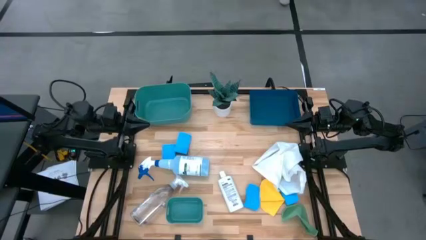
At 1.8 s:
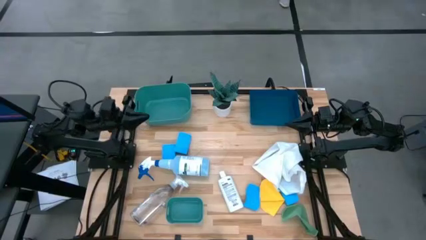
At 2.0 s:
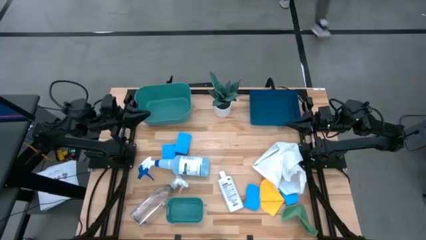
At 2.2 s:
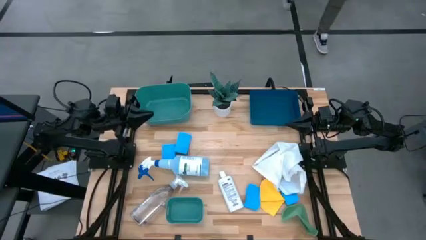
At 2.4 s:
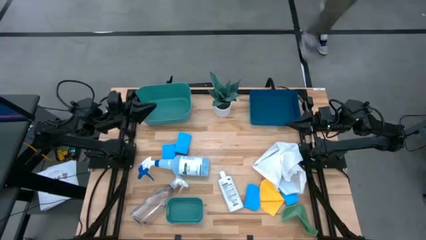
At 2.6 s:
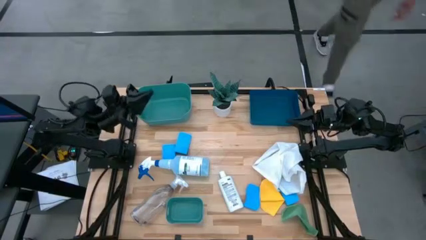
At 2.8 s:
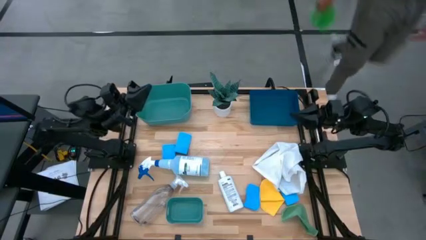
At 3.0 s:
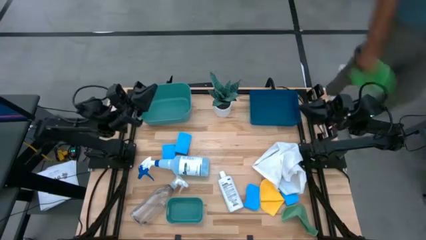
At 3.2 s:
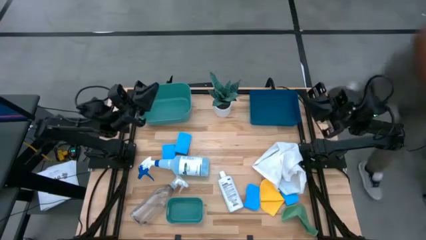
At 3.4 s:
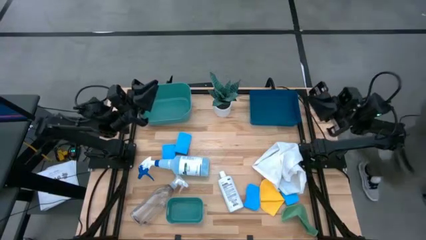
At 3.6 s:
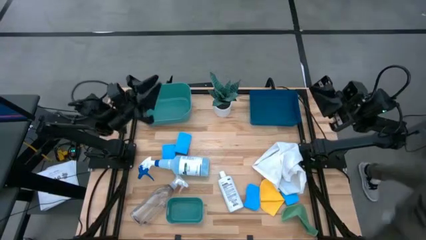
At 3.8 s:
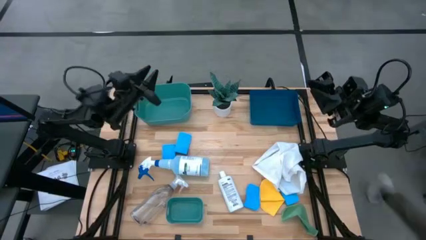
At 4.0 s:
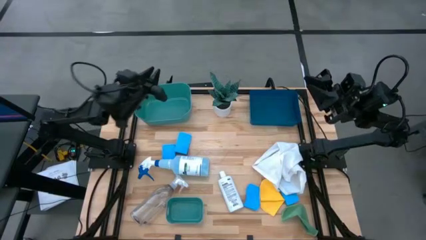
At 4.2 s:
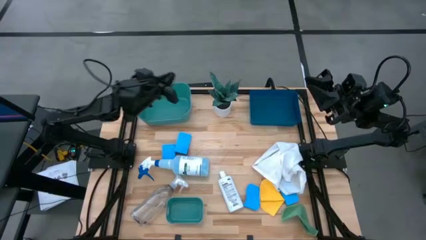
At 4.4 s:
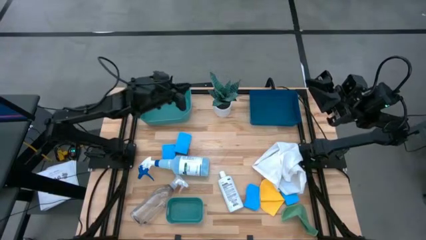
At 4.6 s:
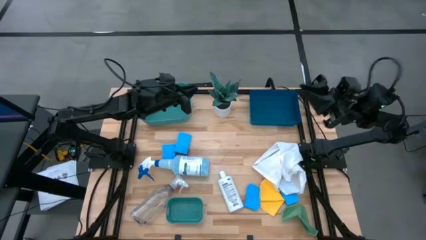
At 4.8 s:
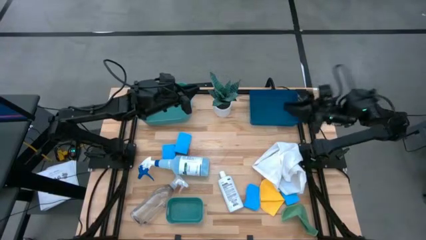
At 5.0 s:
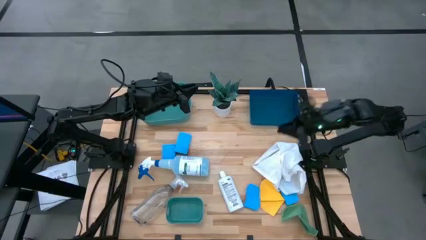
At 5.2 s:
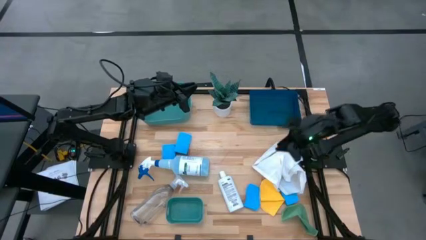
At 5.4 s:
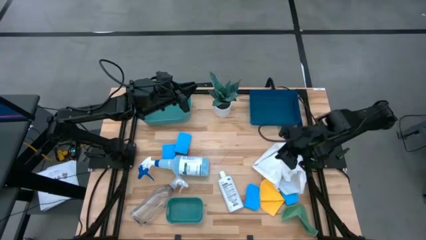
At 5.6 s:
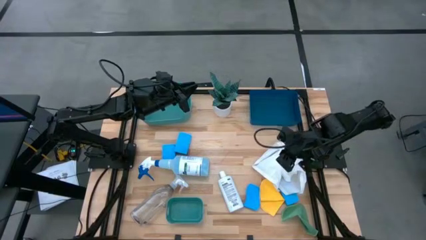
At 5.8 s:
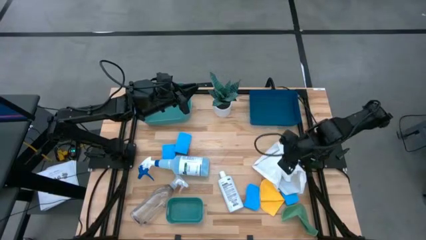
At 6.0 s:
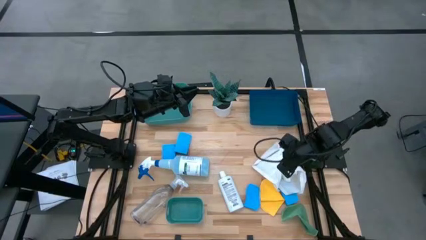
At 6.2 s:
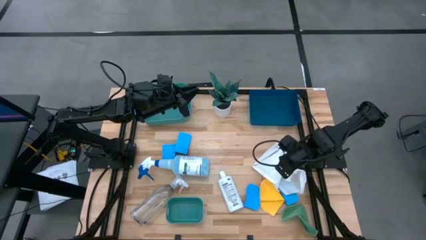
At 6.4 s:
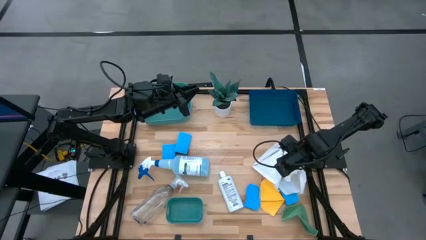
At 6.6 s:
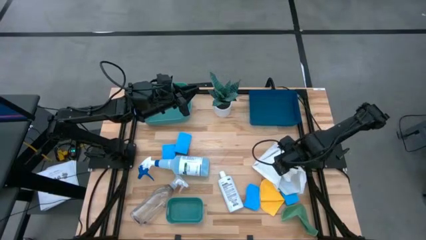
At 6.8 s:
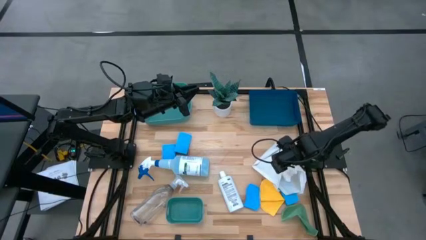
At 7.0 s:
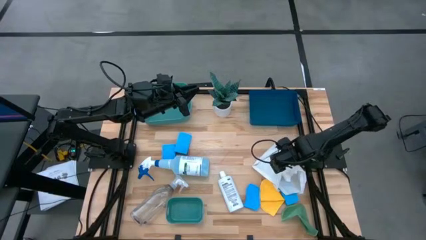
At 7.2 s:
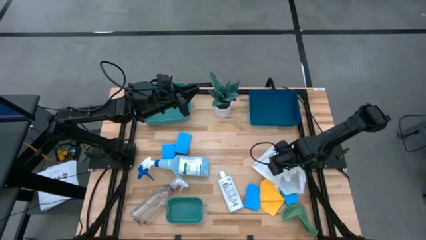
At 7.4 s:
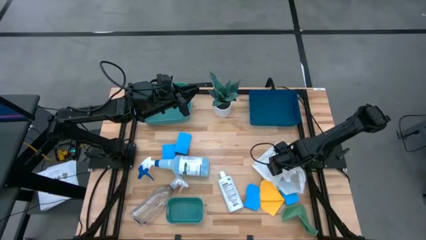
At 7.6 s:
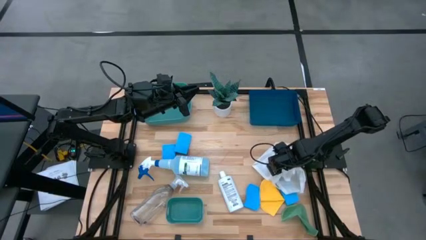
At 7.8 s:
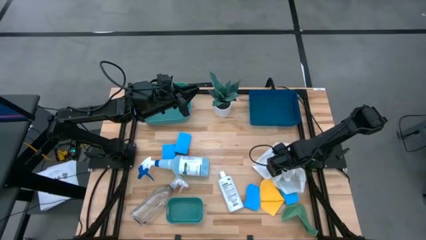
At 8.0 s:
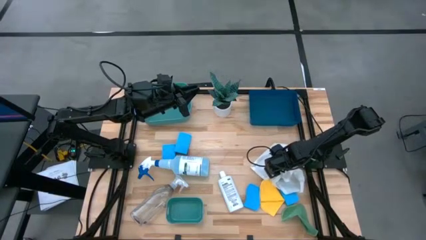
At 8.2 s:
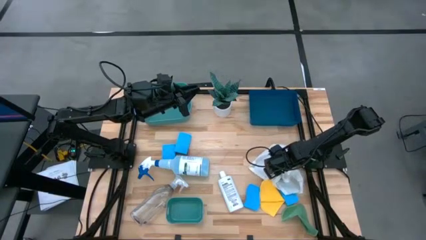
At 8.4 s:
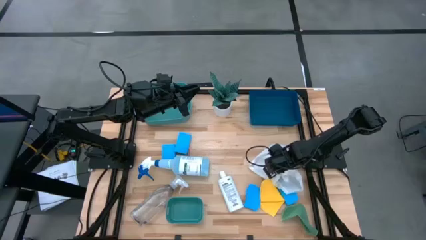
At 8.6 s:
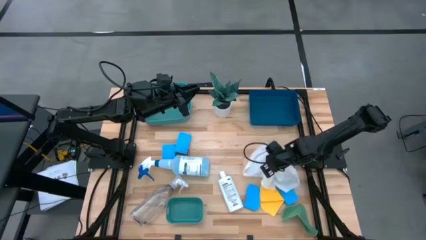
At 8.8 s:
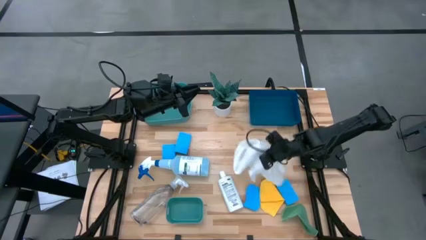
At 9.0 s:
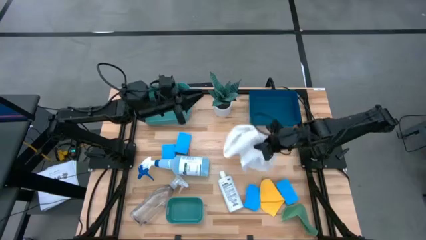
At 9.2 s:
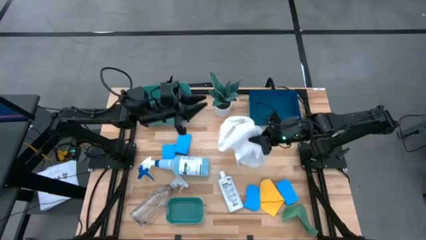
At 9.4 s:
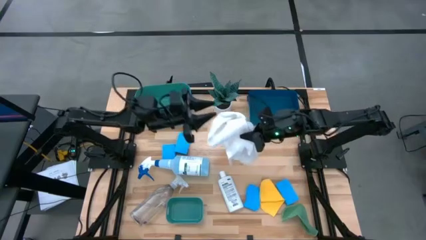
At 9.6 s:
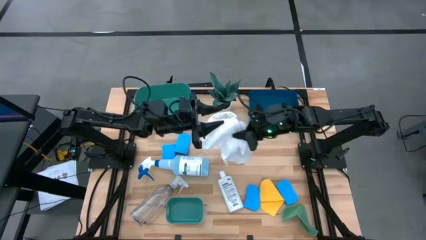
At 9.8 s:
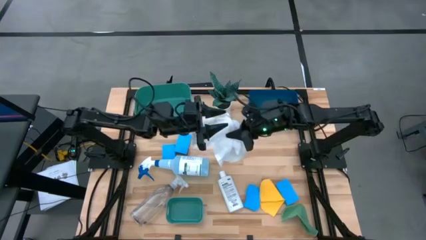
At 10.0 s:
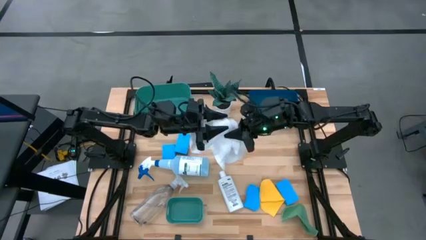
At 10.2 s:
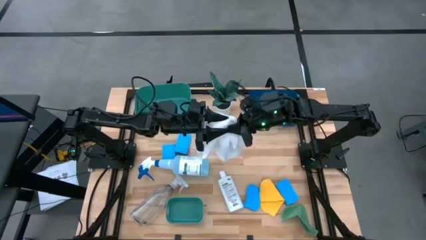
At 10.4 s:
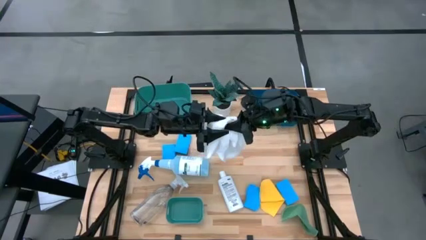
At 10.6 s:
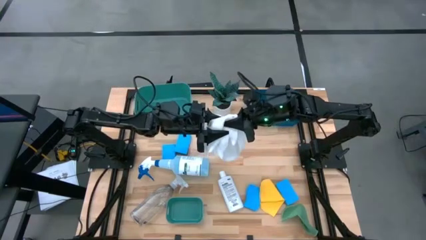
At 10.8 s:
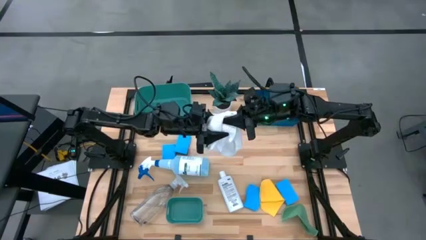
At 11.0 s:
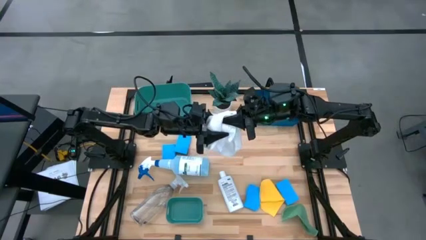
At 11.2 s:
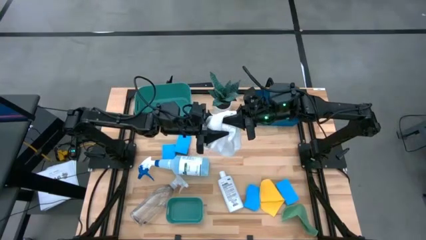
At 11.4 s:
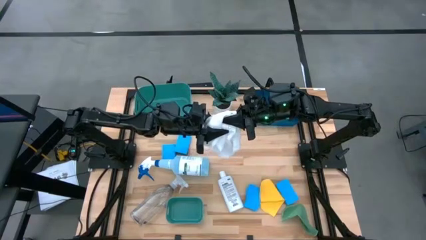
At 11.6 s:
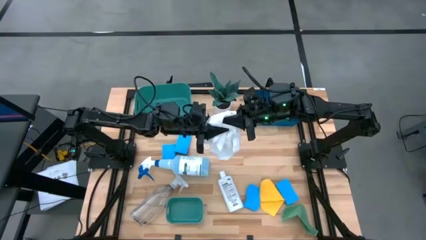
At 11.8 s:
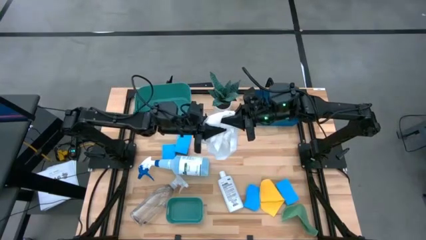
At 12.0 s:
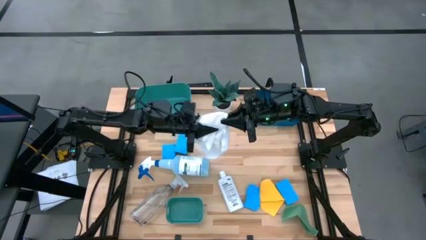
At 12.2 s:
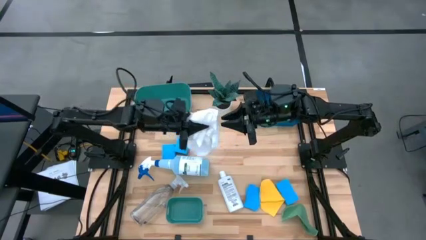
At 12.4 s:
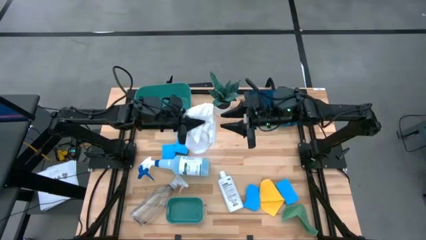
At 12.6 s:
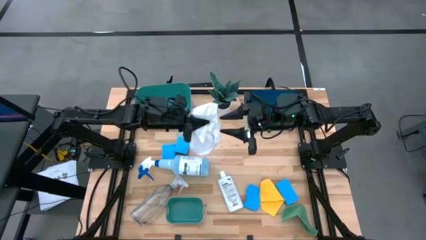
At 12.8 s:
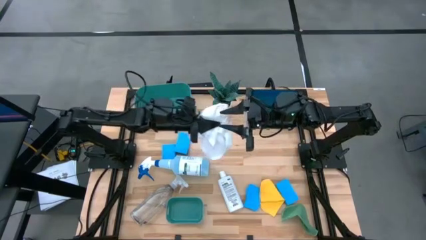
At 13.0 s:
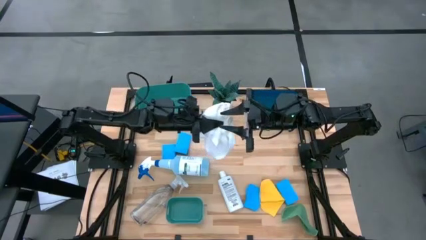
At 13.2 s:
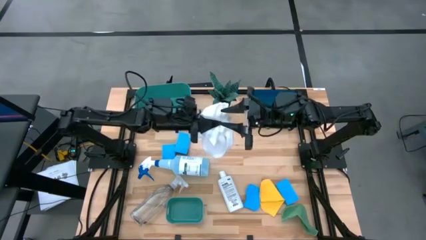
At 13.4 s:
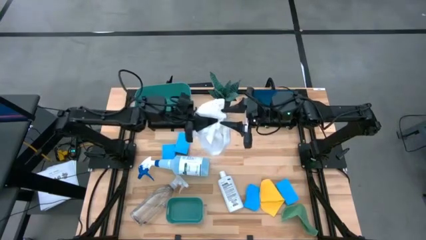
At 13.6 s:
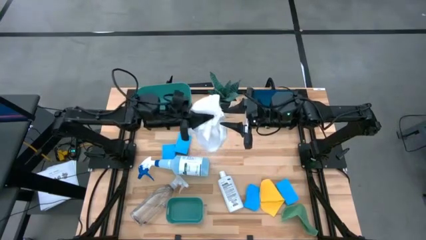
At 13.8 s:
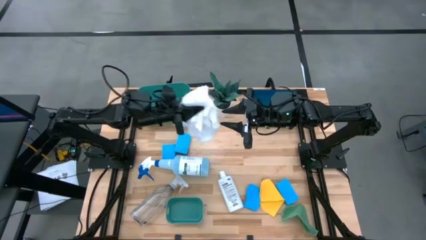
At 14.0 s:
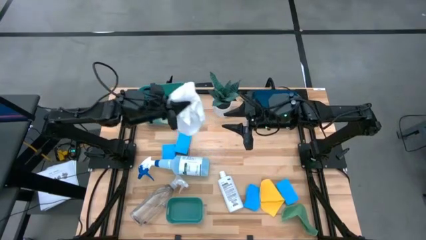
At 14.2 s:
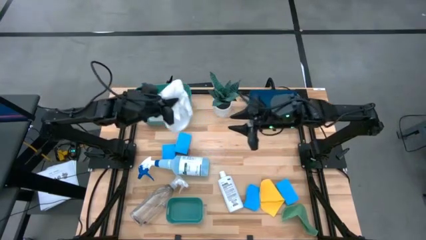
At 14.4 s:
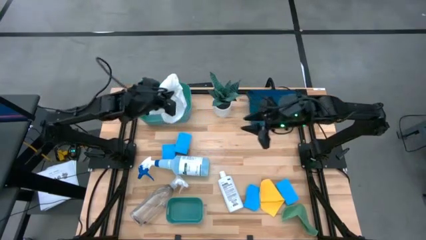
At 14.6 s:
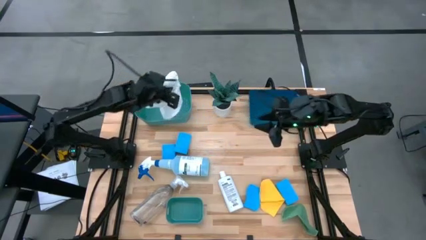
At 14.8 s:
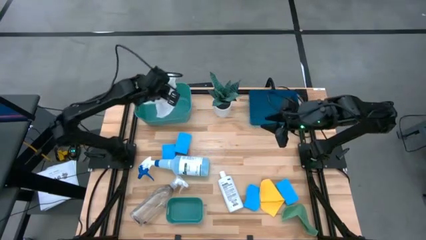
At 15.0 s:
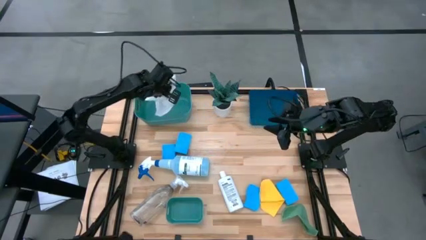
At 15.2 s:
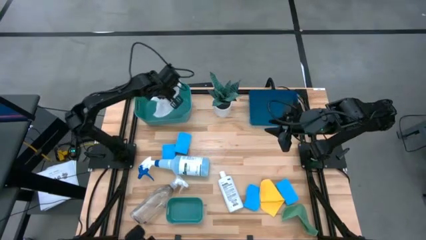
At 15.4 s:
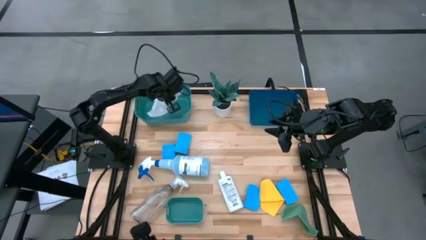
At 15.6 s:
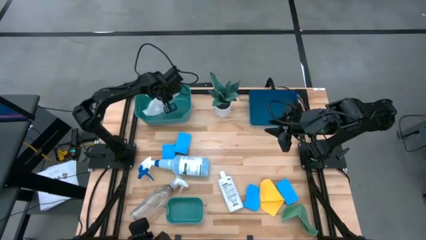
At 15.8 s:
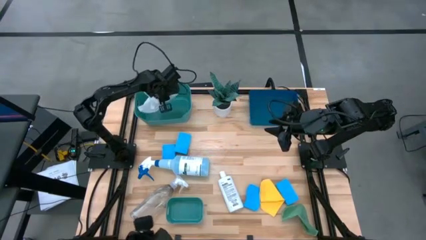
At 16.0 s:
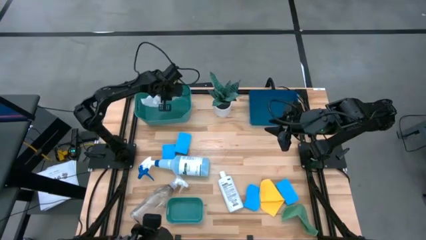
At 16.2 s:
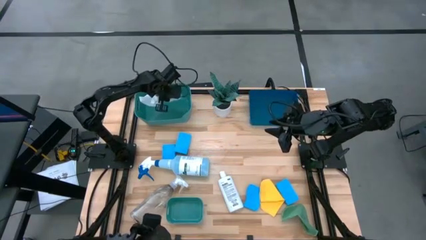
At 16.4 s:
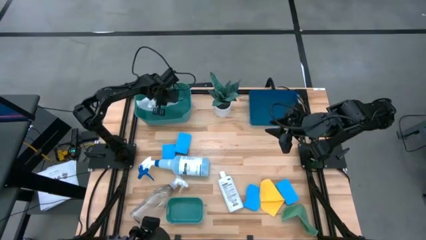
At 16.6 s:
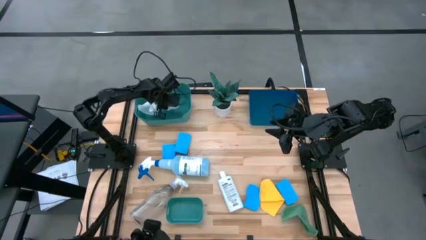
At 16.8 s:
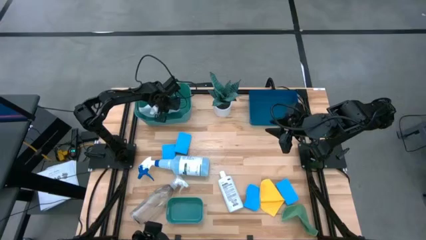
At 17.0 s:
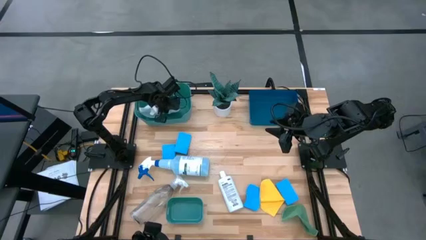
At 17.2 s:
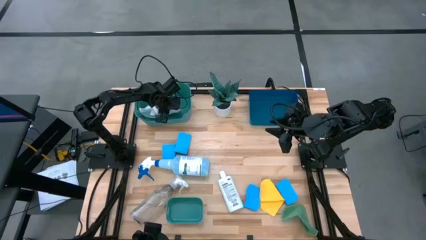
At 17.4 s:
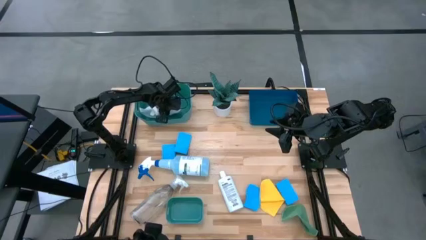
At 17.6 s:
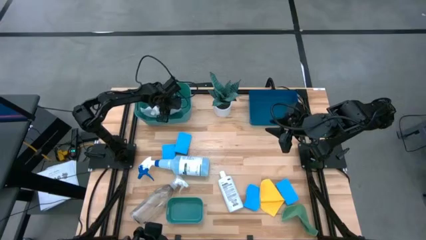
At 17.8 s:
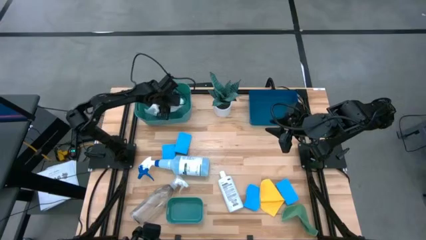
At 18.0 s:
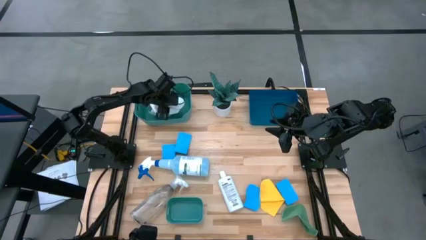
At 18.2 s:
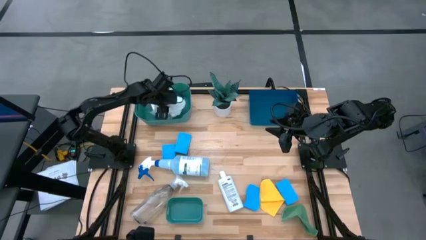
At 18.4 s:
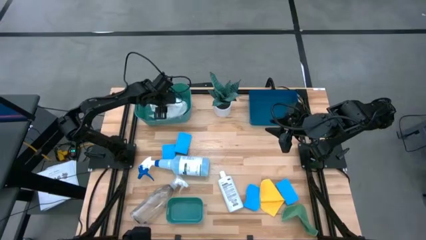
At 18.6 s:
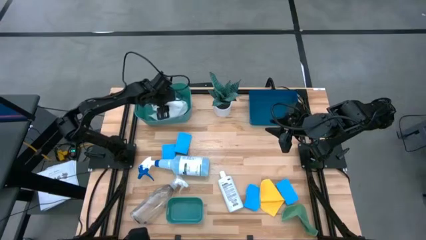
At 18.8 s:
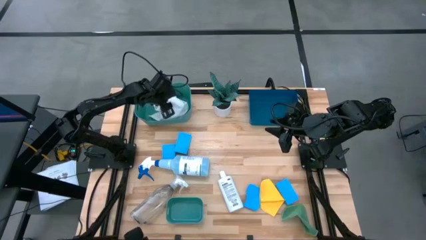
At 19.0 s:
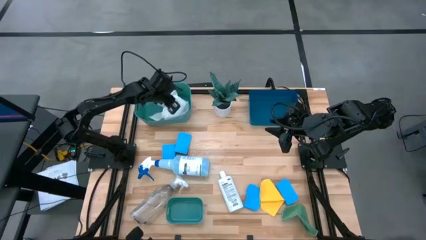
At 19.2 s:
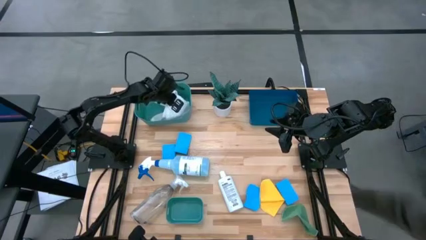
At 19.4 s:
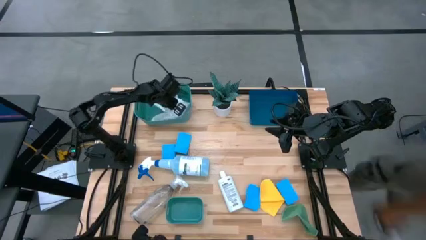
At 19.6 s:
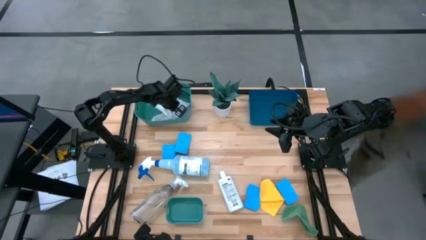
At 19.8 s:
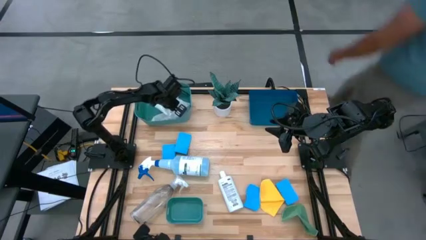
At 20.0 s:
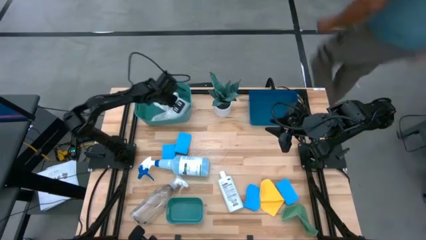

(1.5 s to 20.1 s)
Task: Pick & Place Kitchen Items
Put the white microfiber cloth into the top green bin
